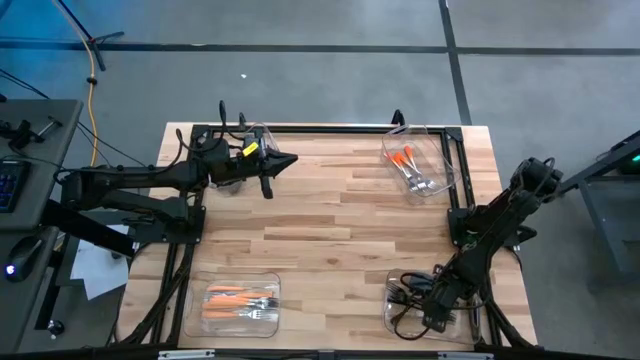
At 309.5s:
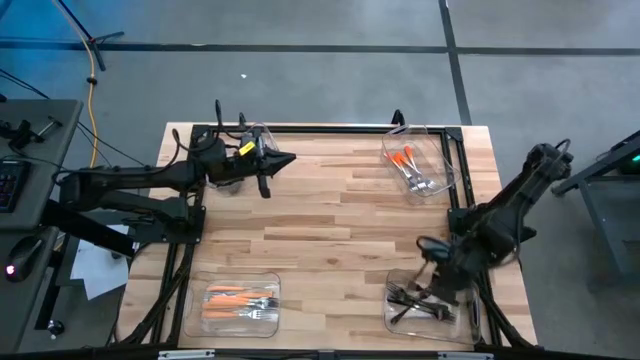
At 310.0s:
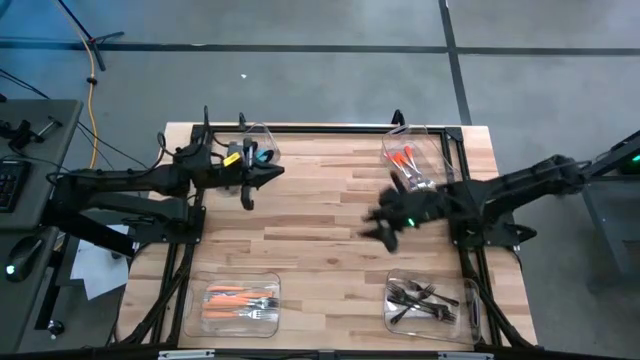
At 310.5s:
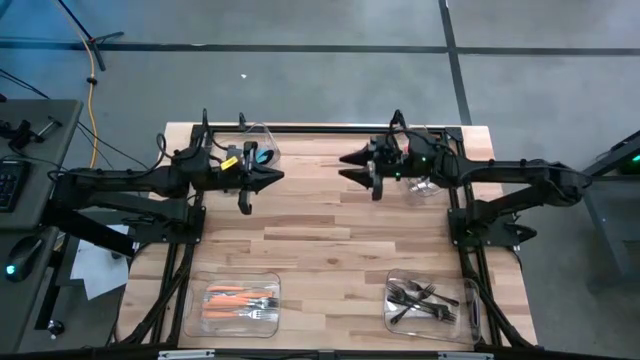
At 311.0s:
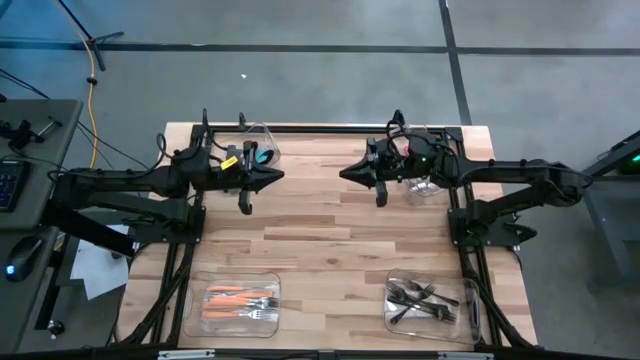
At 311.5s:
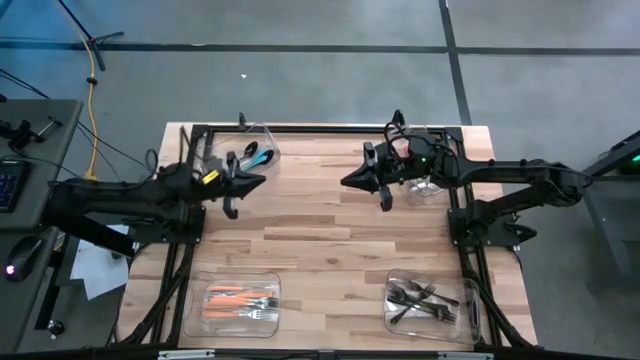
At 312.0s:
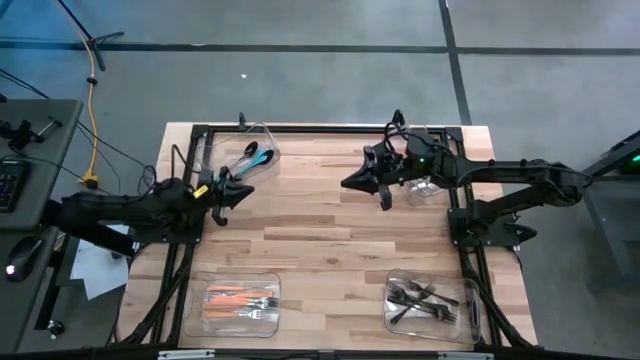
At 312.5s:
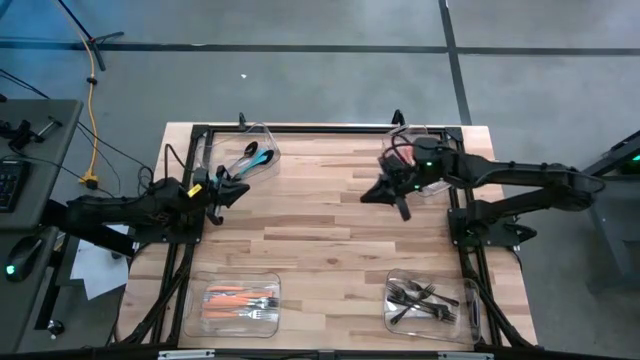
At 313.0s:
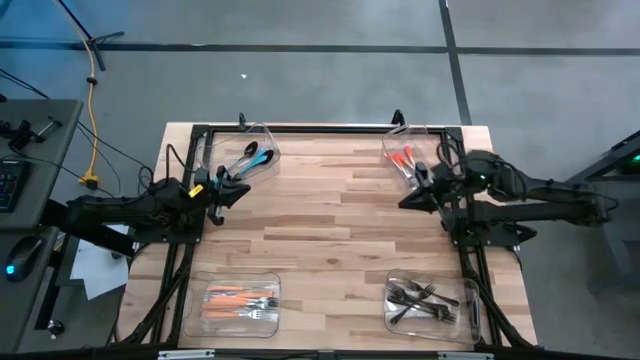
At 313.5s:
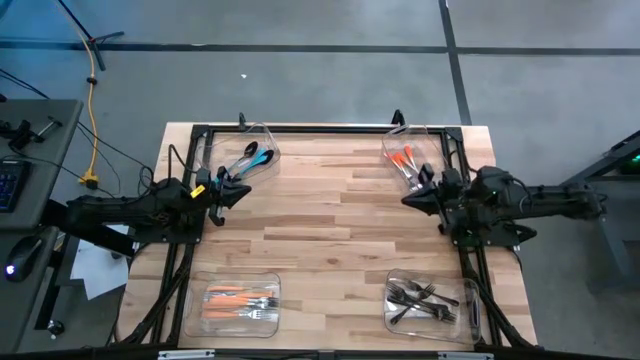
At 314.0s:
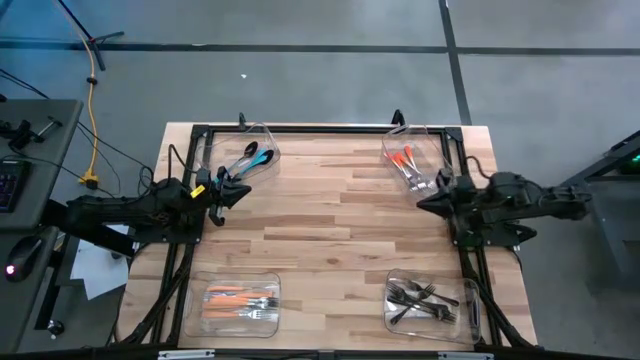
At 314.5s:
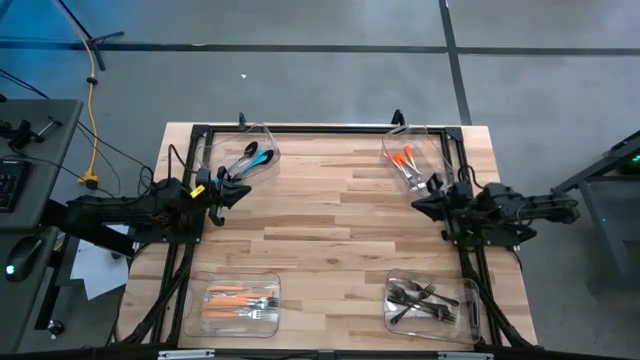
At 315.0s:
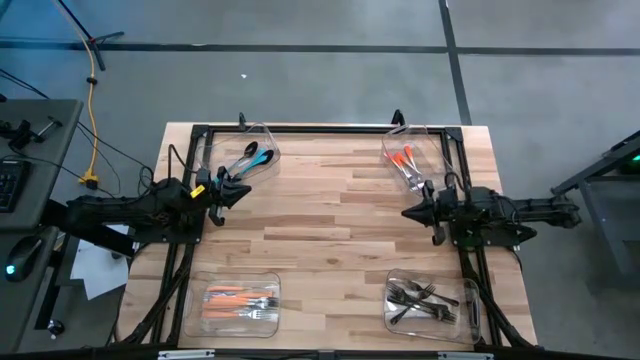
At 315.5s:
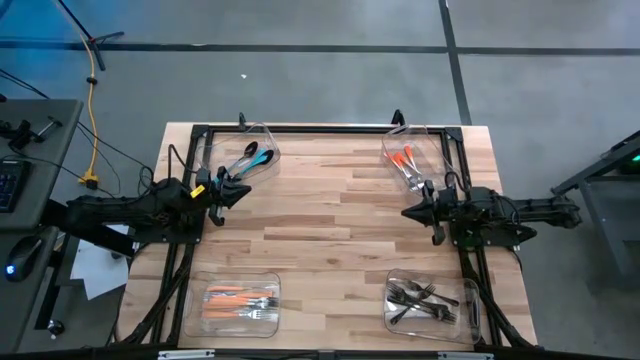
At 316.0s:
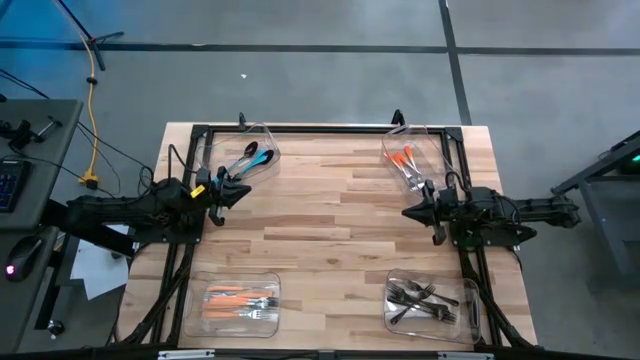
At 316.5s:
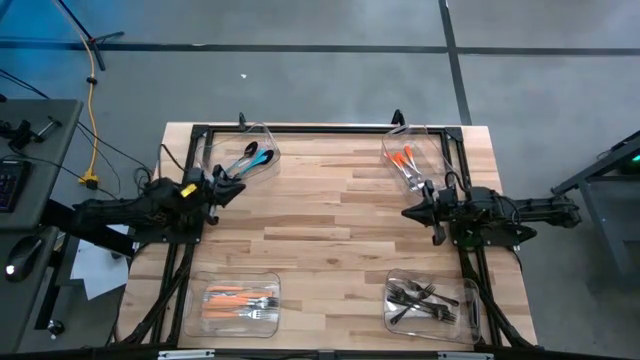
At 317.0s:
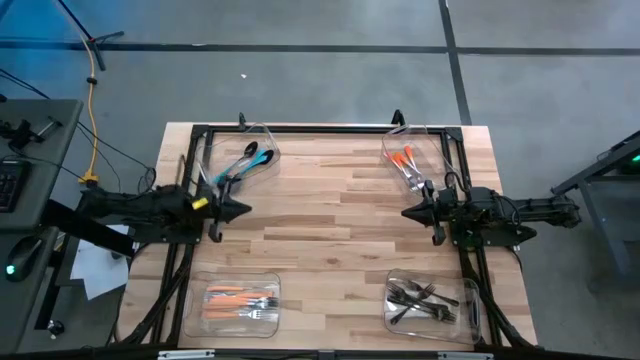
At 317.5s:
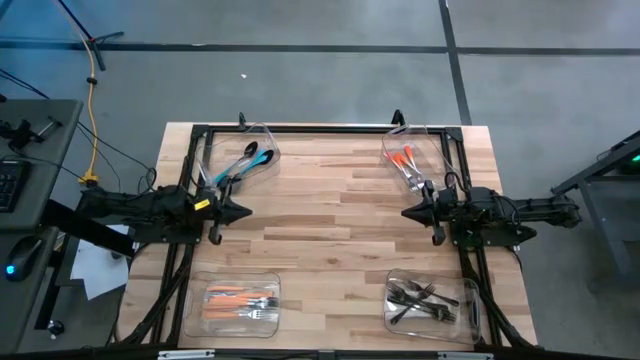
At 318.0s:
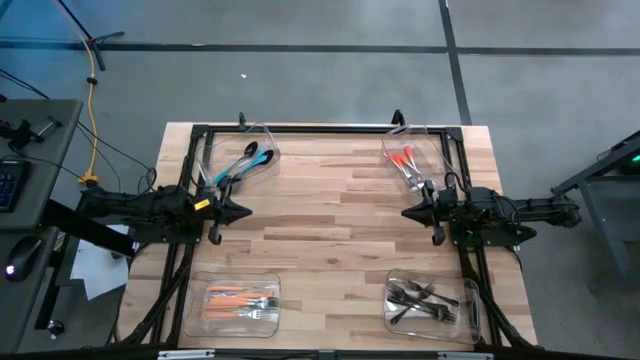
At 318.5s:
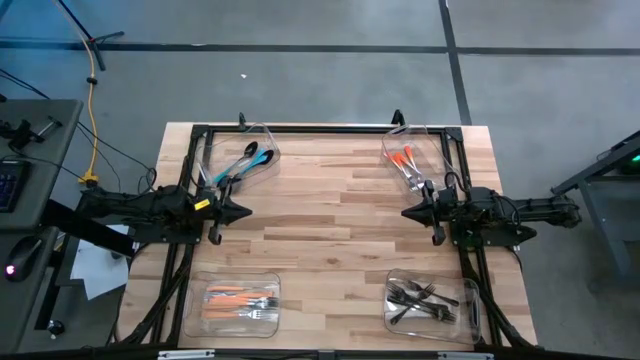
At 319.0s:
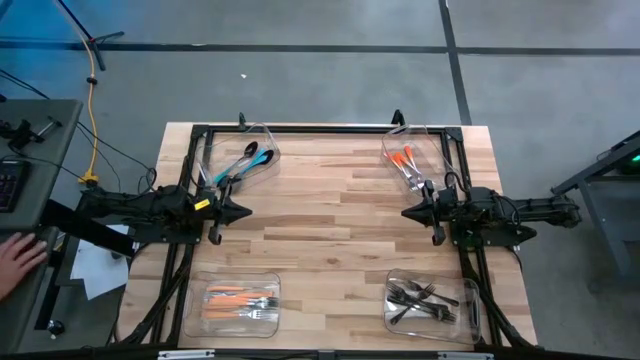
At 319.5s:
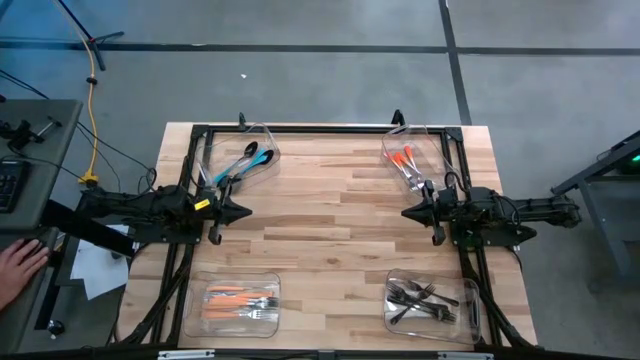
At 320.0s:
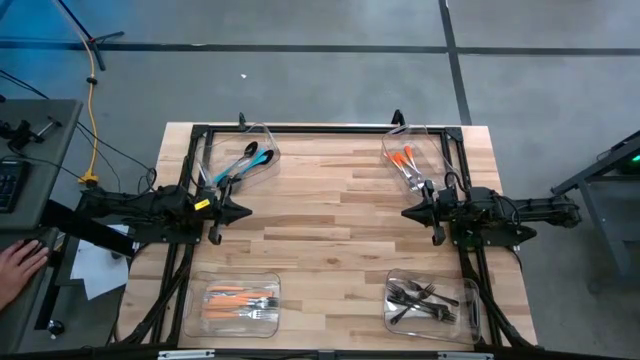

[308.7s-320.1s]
Task: Sort silverware by color (type)
Return to Home Position

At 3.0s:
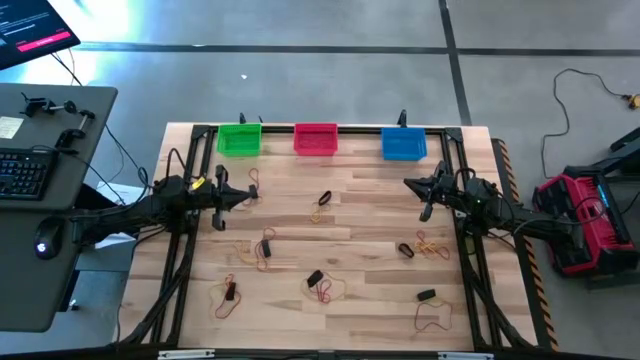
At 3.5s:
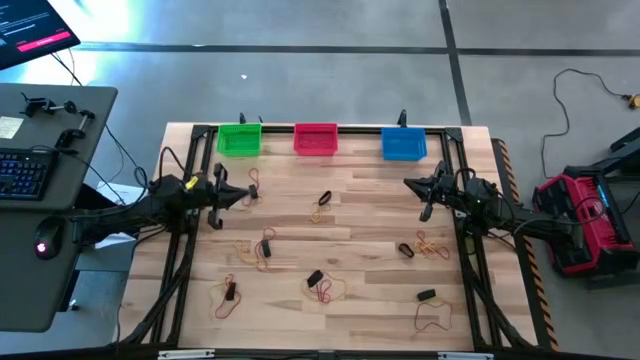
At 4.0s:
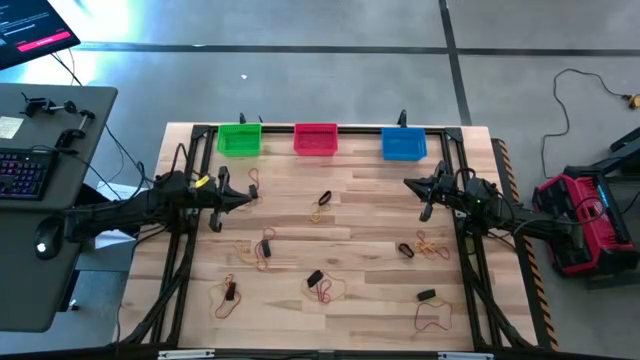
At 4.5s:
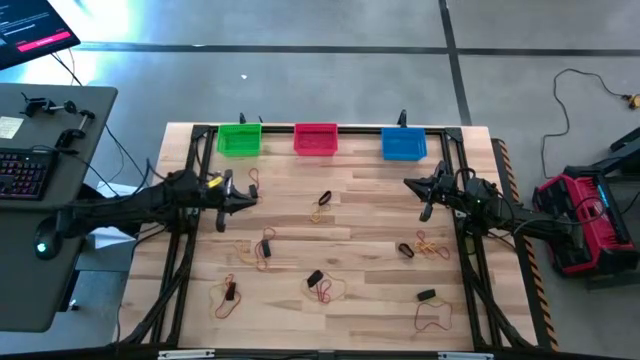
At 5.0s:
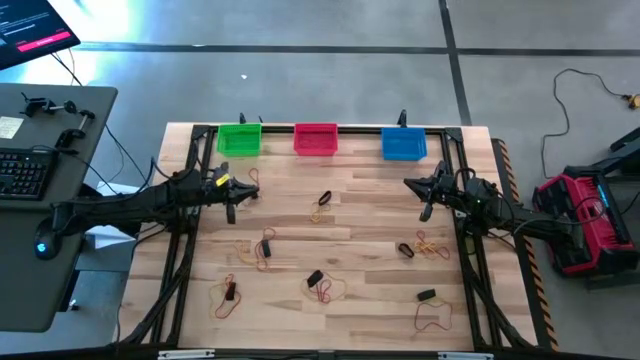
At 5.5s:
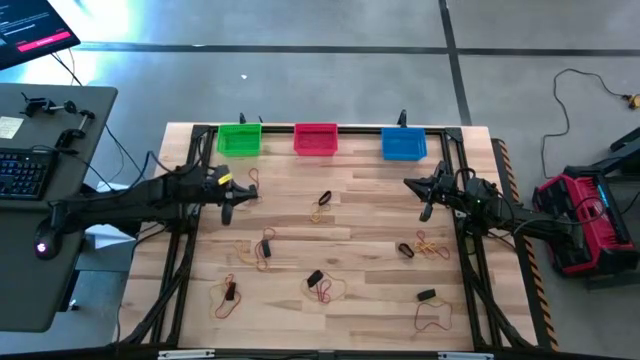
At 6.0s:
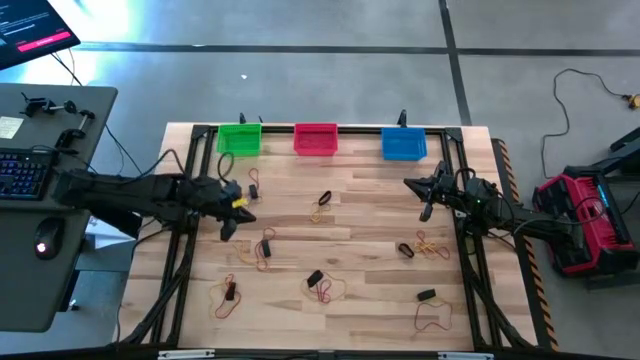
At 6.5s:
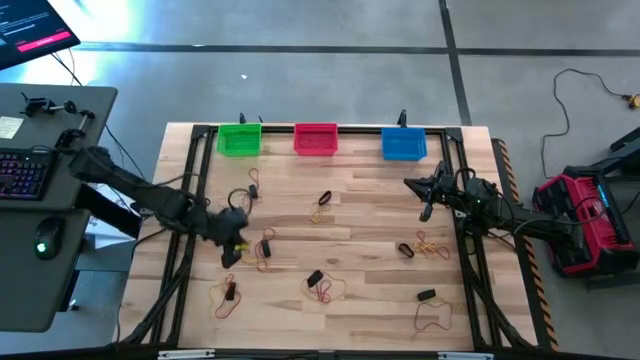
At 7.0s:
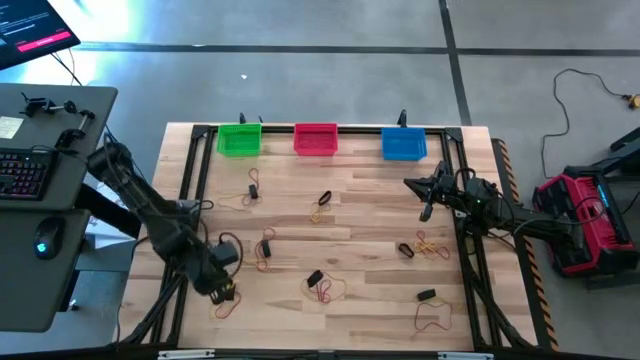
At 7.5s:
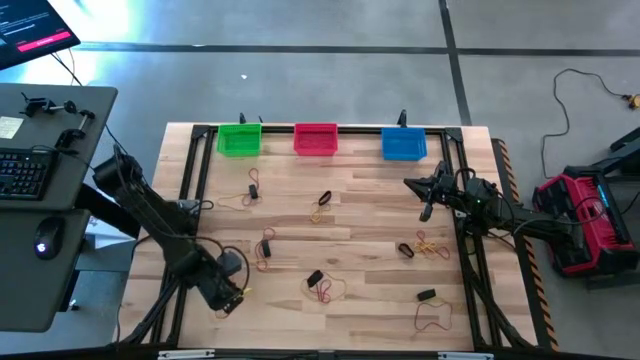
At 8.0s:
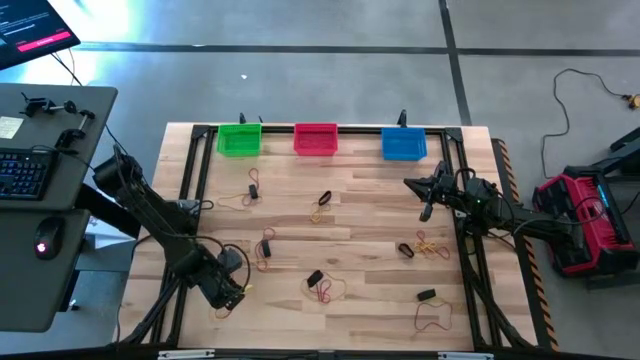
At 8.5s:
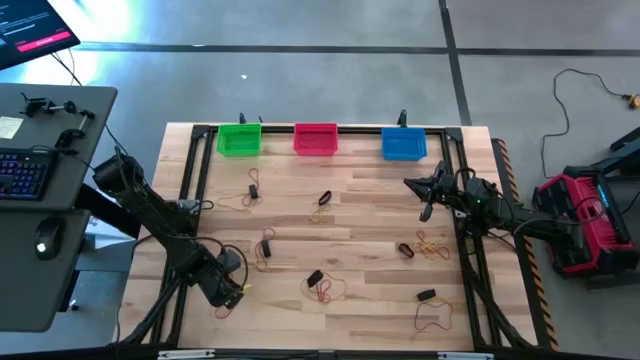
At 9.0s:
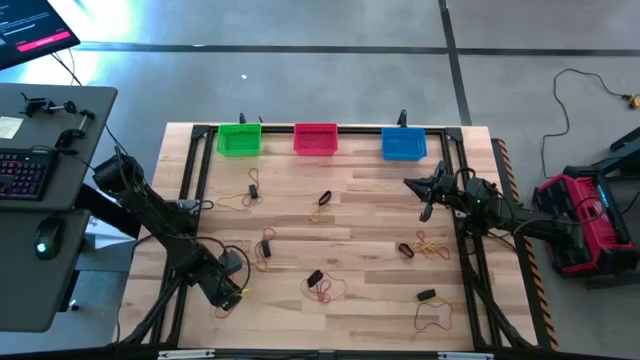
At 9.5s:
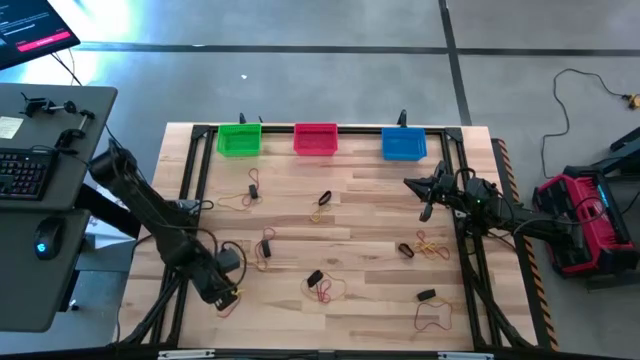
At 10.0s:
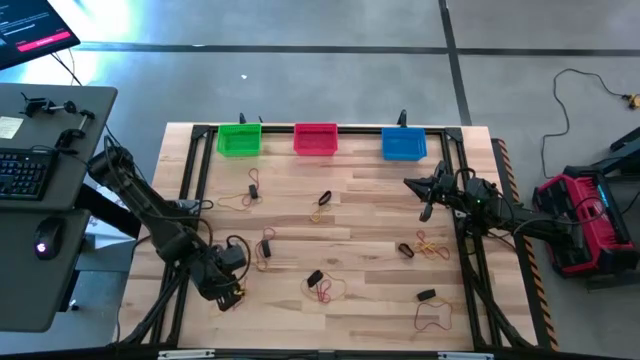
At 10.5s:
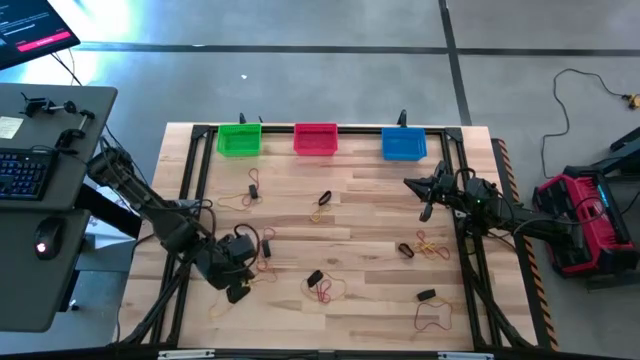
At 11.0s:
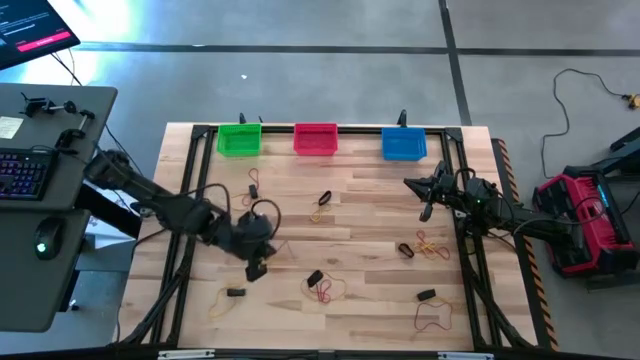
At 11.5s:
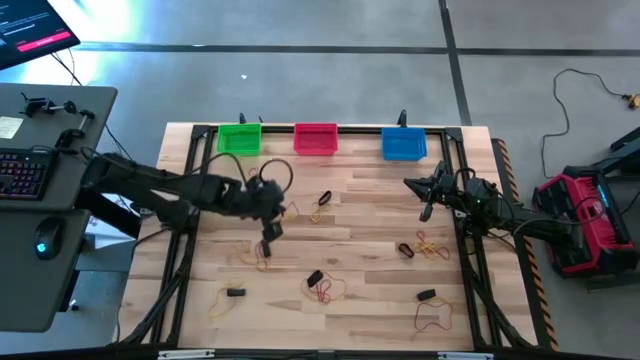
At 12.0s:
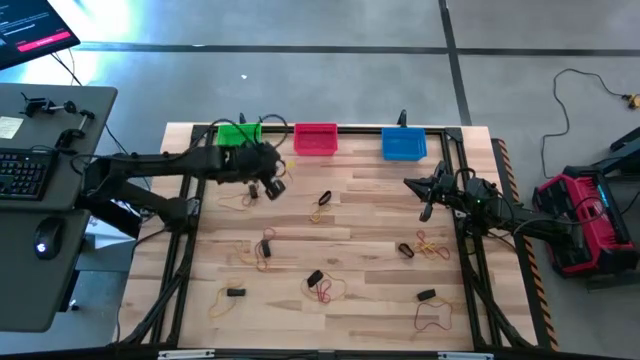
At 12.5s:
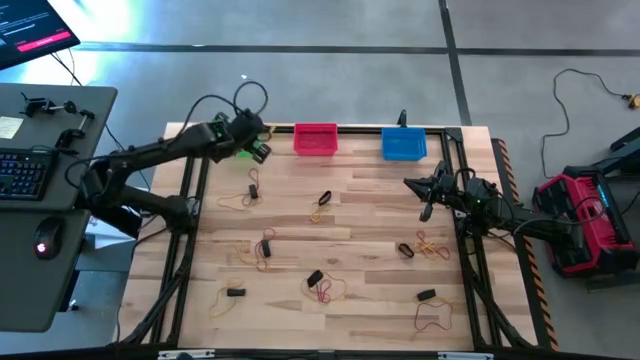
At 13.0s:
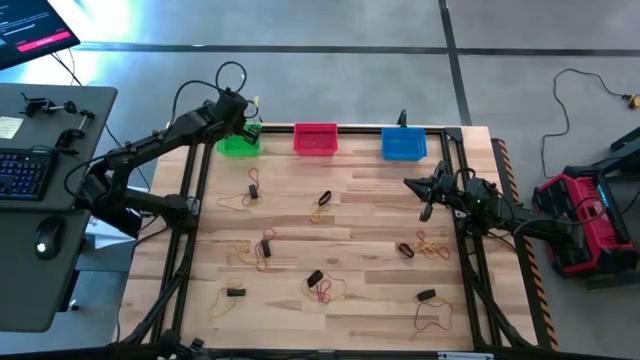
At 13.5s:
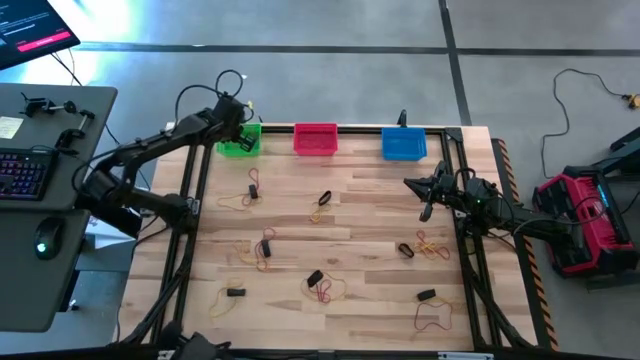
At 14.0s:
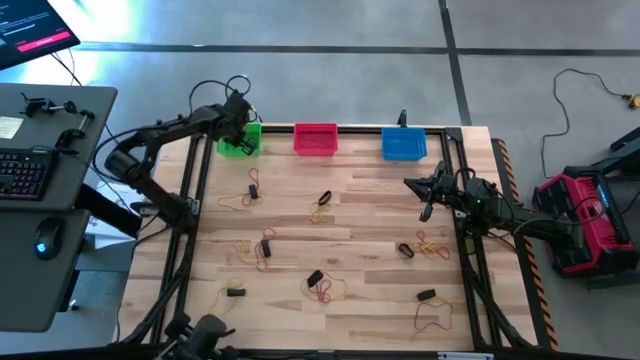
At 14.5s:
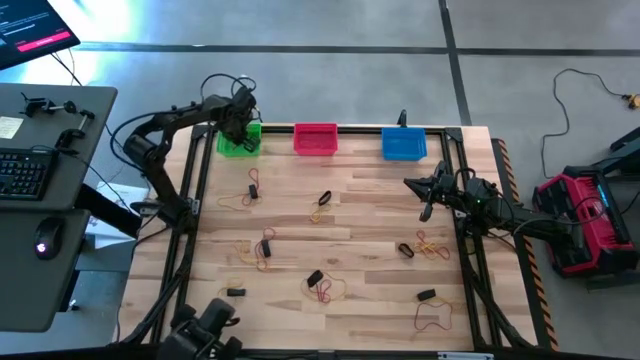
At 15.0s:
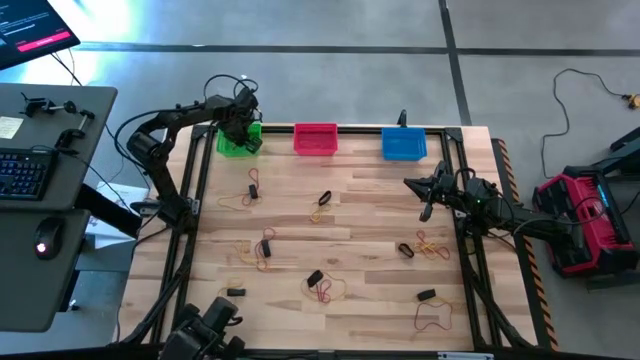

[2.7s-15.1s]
Task: Sort rubber bands into baskets
Put the red rubber band into the green bin
